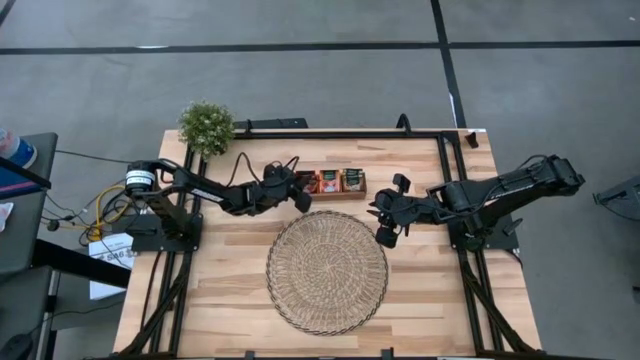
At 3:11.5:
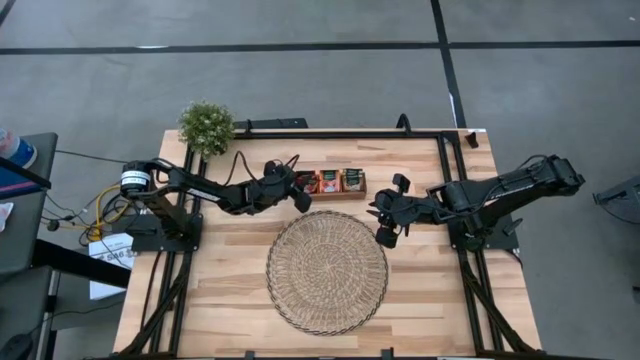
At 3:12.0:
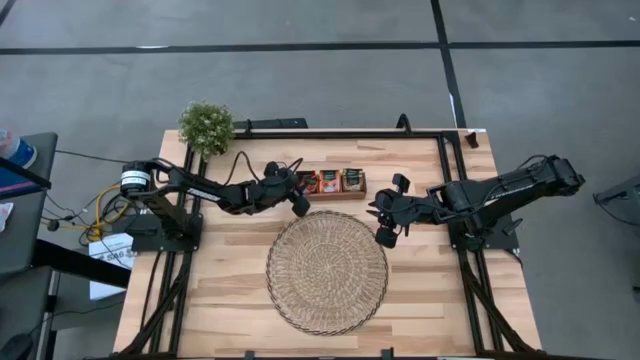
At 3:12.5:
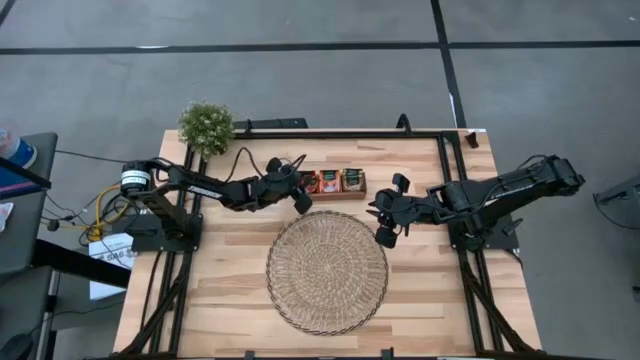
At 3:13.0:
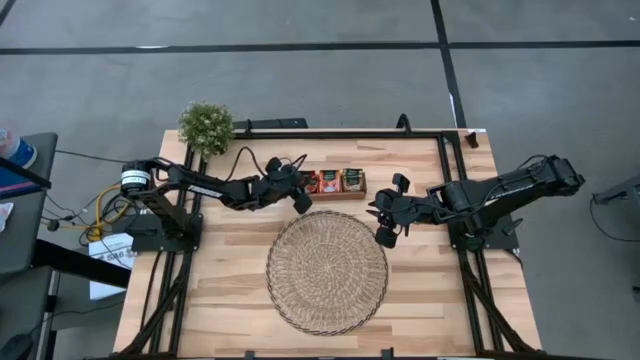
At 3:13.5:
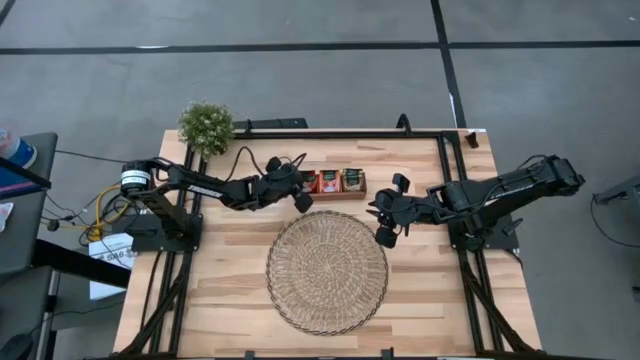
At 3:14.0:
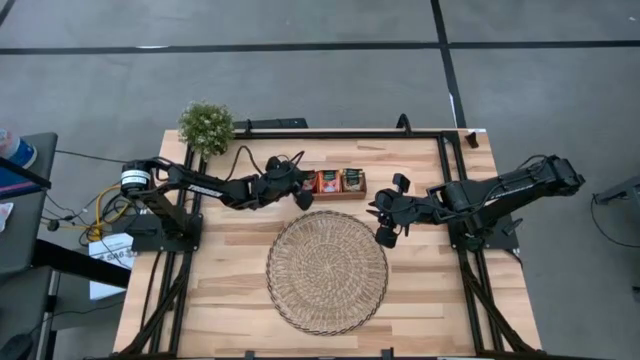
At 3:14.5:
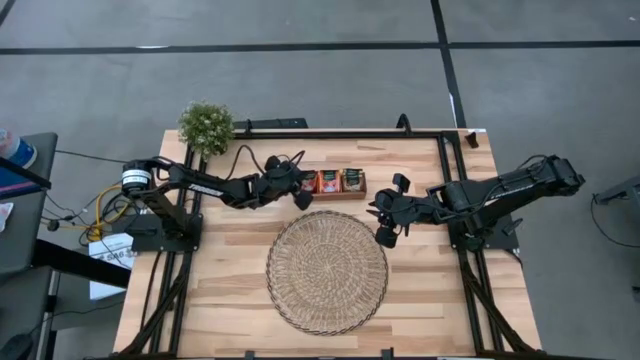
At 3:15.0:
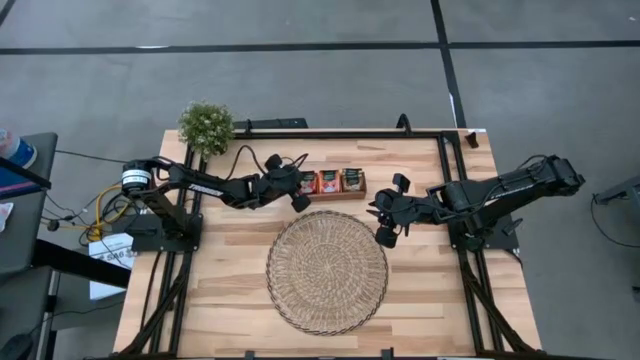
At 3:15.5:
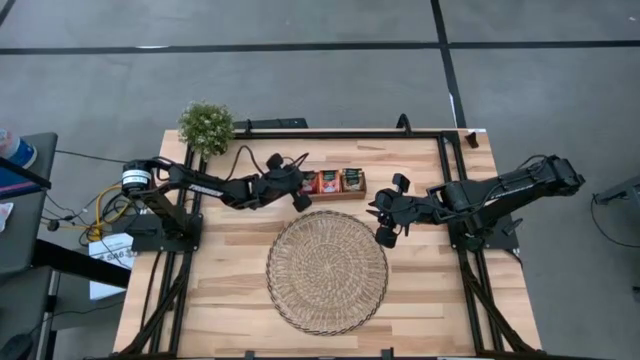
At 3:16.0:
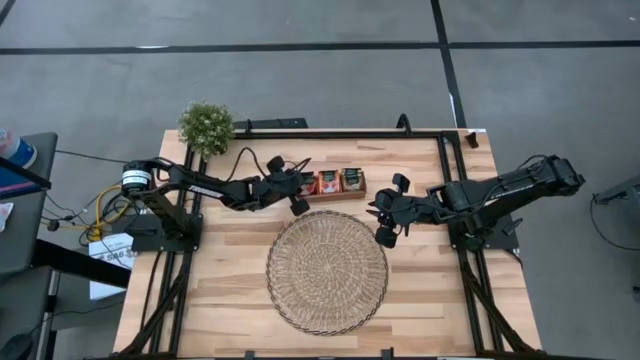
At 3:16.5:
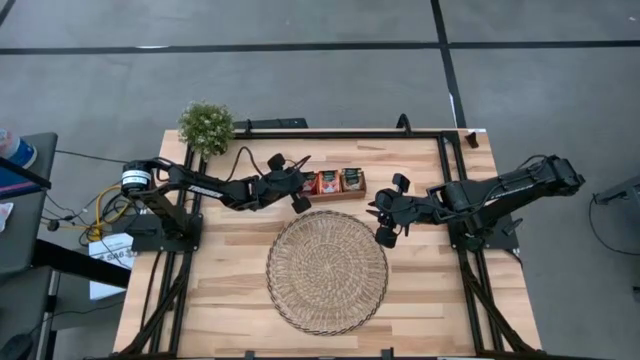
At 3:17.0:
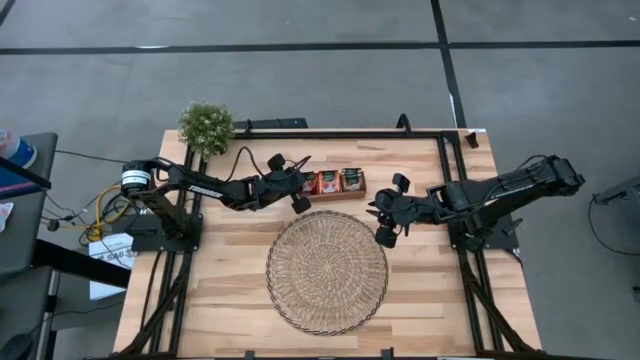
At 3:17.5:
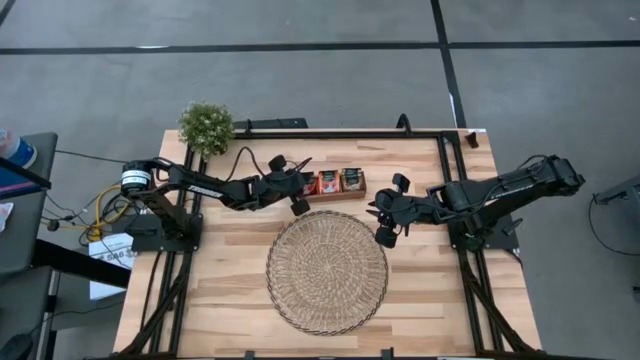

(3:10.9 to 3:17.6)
Task: Pick & Place Tea
Adjust the red tea bag

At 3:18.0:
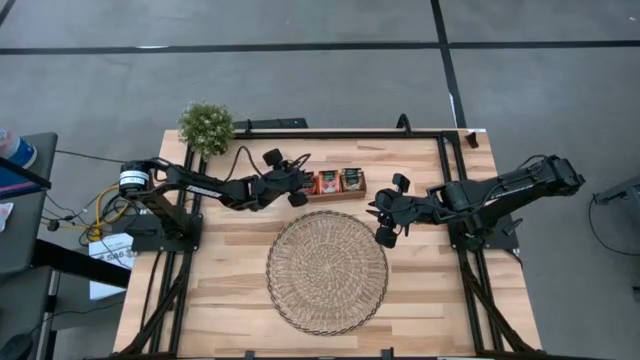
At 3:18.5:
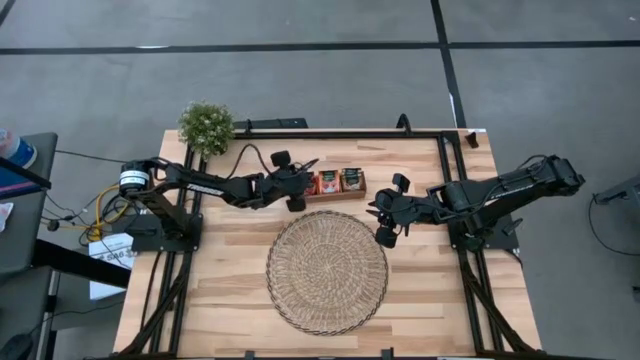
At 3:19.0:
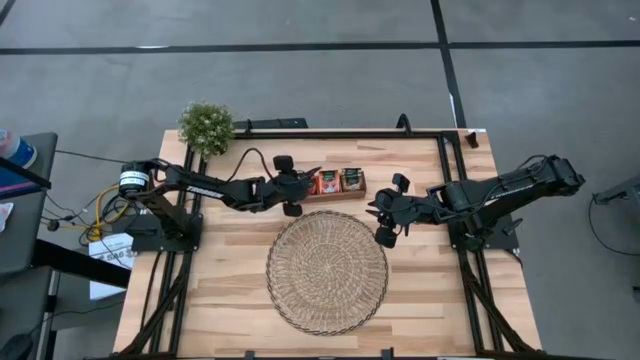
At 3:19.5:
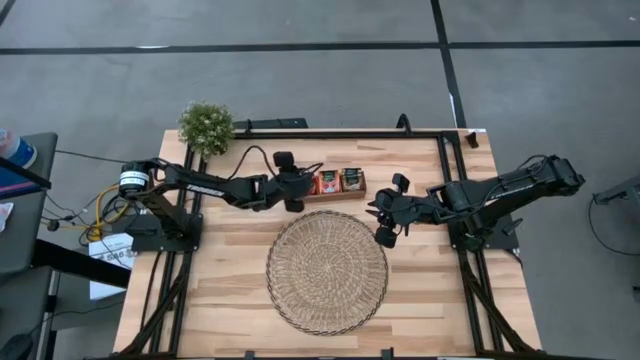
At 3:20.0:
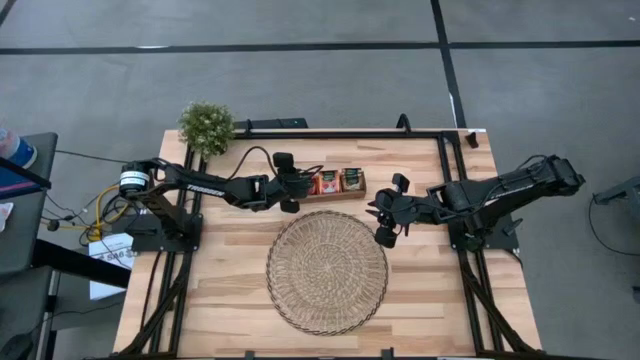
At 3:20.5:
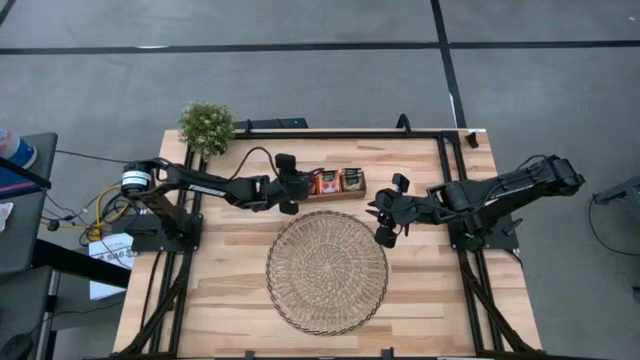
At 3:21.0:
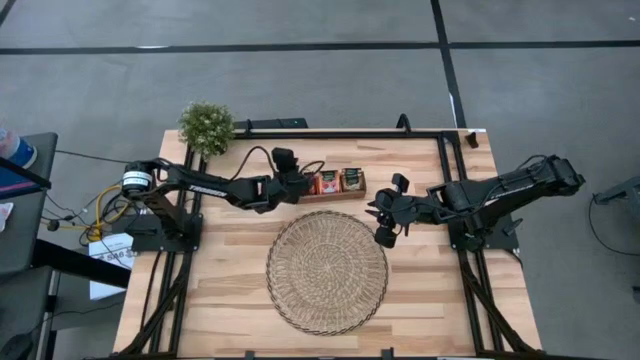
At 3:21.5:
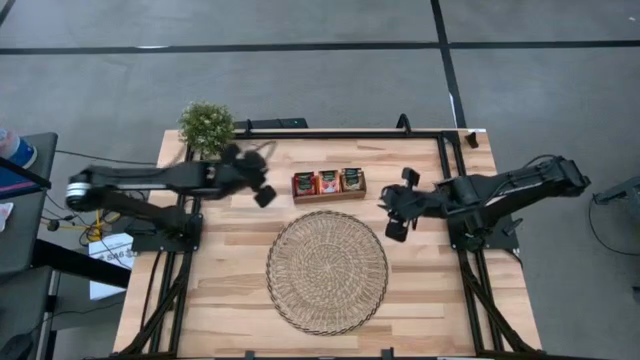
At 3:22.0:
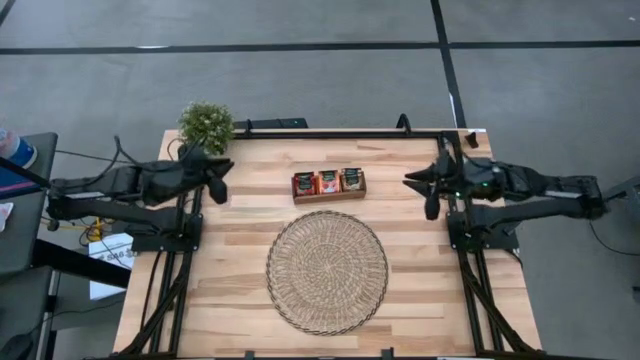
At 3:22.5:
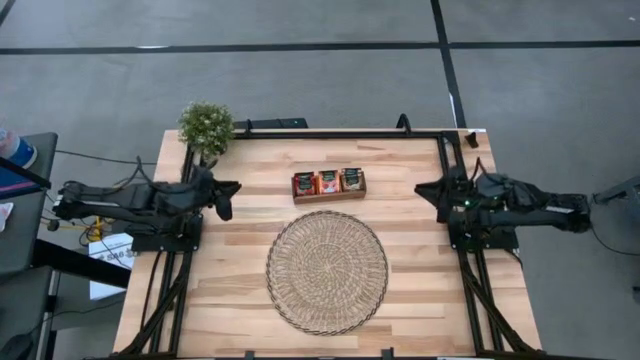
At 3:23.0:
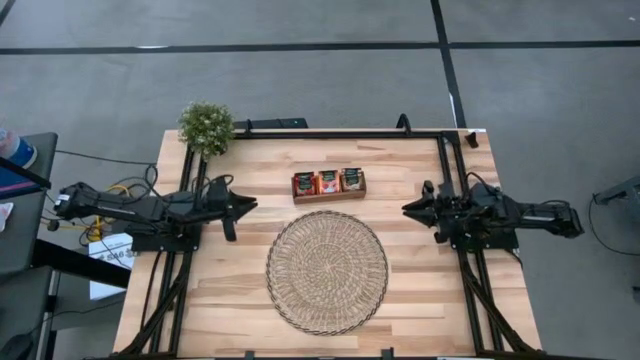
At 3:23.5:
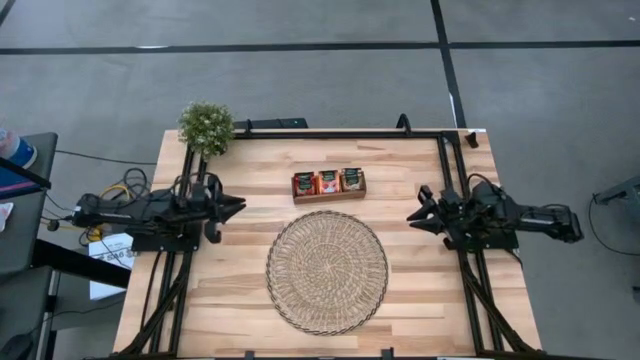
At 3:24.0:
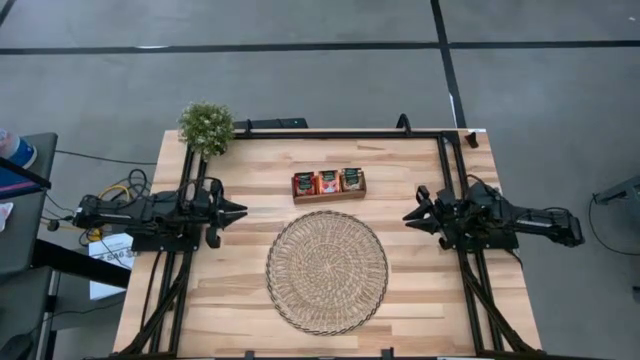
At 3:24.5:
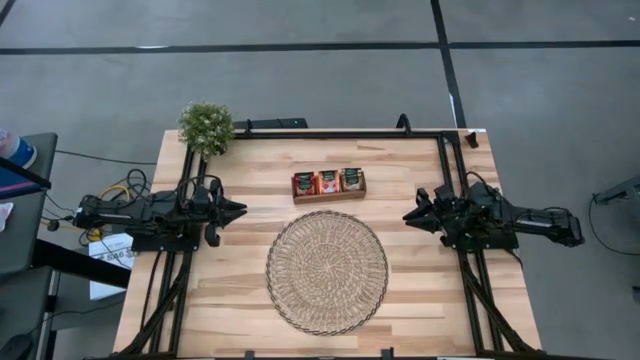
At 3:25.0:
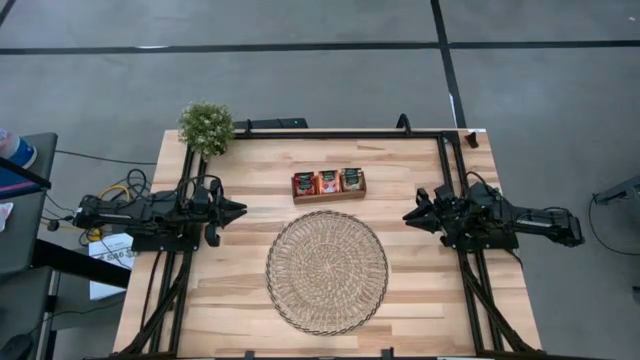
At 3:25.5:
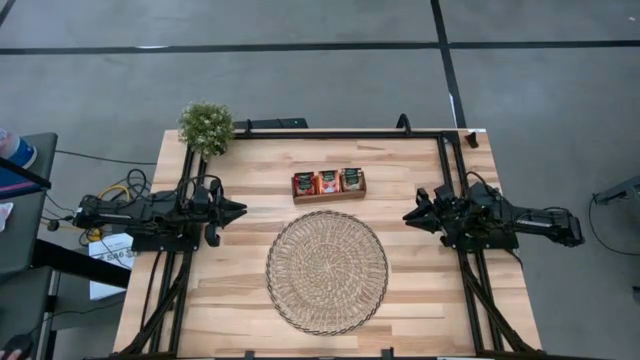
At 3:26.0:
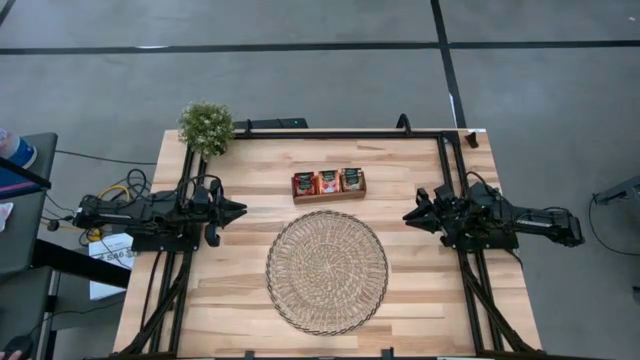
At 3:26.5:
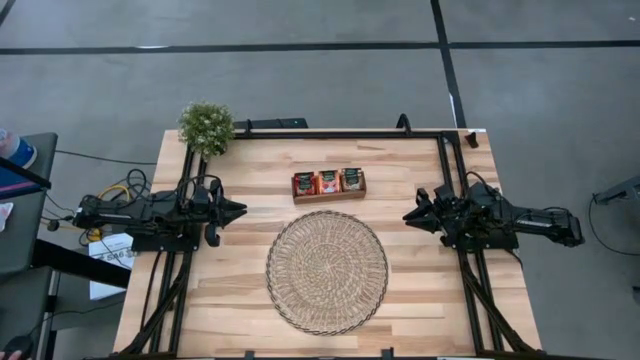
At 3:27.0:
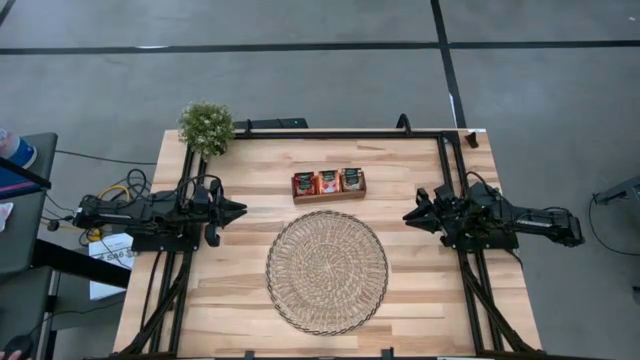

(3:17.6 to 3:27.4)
Return to Home Position

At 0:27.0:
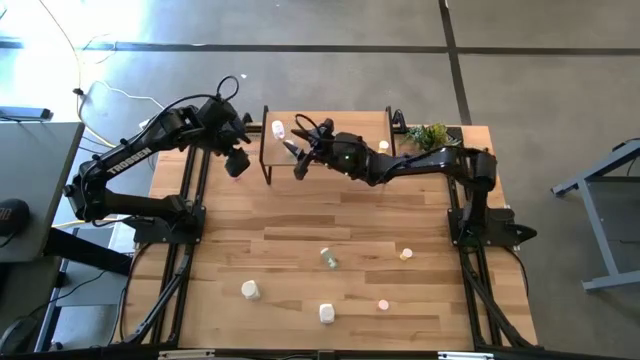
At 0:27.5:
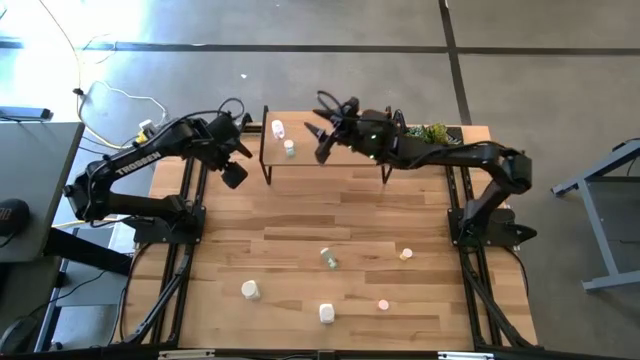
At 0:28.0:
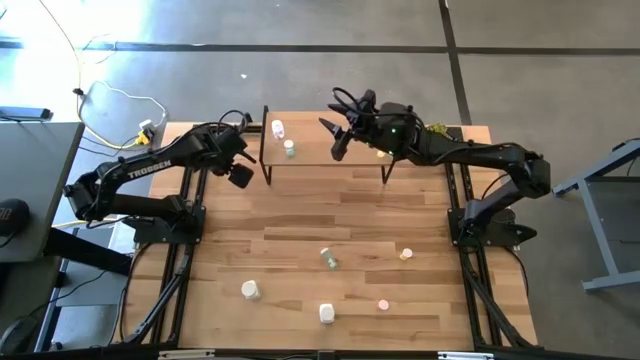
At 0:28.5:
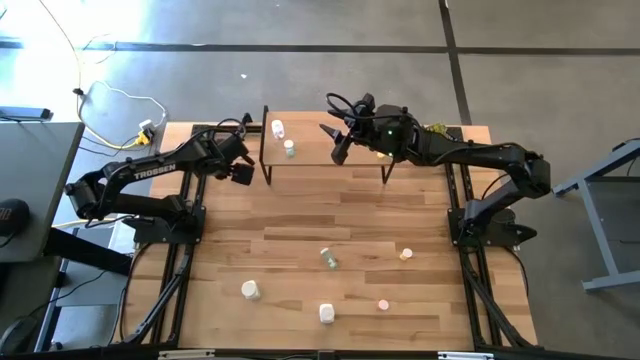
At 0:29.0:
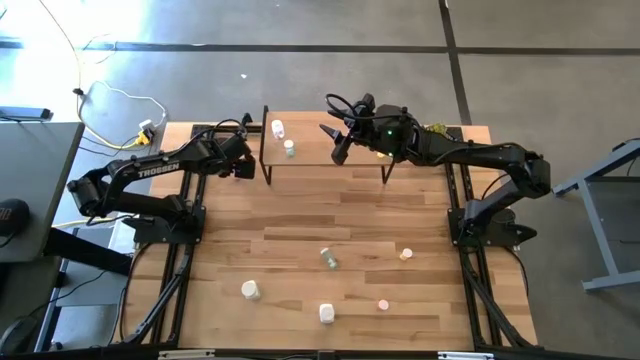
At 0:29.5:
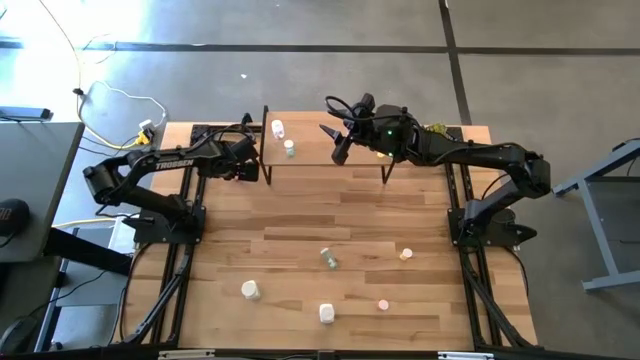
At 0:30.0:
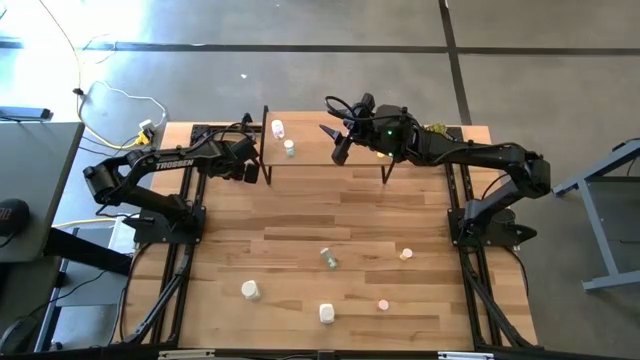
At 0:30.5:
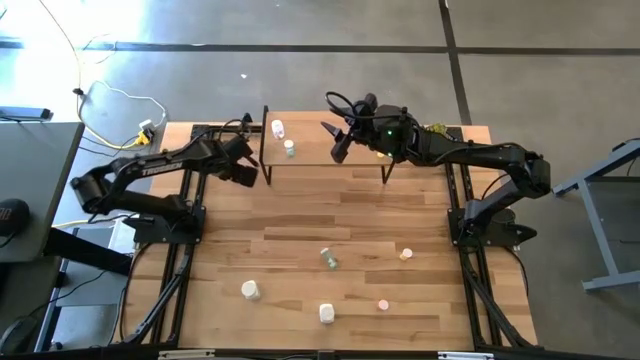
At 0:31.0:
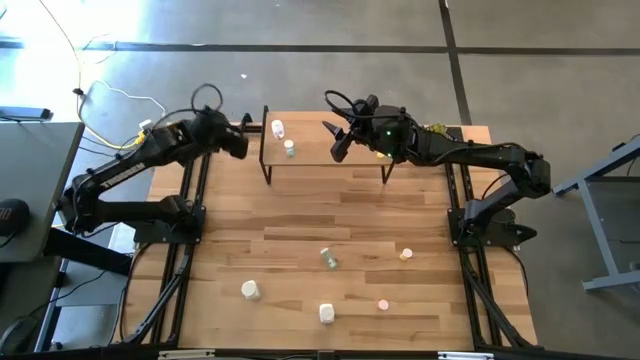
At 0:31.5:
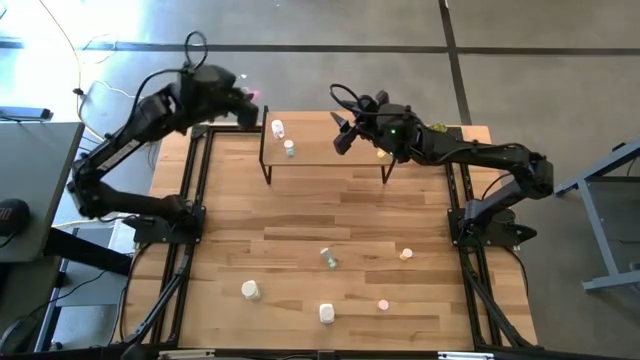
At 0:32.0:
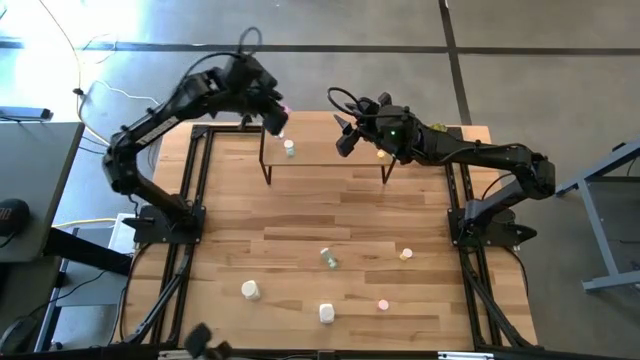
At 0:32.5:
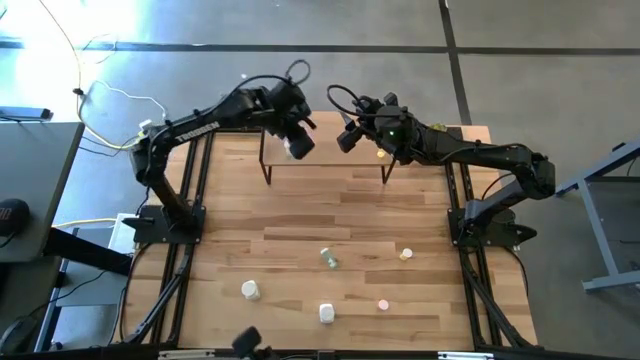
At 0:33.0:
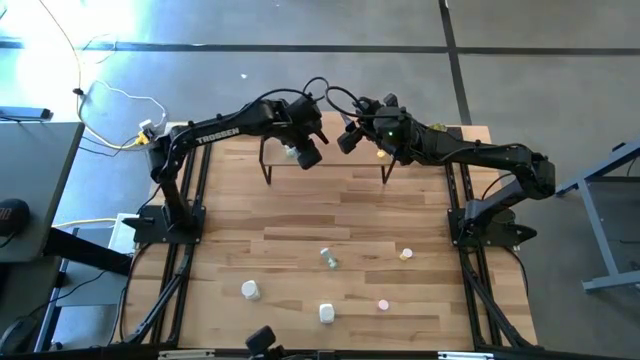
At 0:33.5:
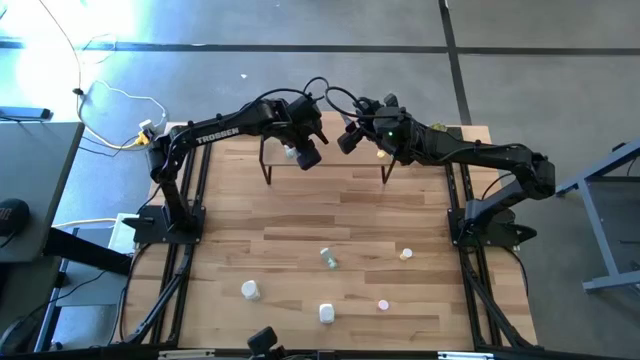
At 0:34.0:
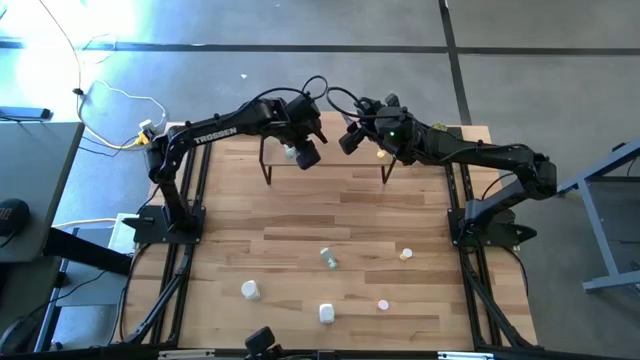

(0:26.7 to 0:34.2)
Task: Pick and place medicine bottles onto shelf by color
Put the top pink medicine bottle on the shelf
